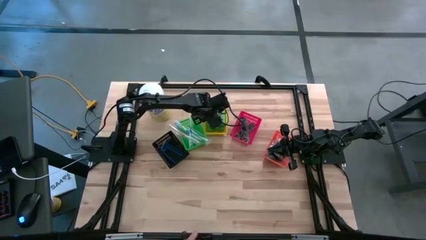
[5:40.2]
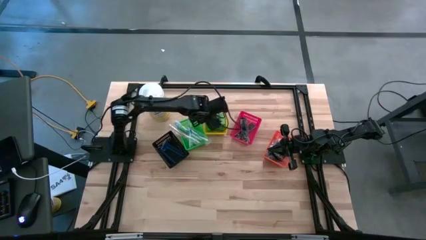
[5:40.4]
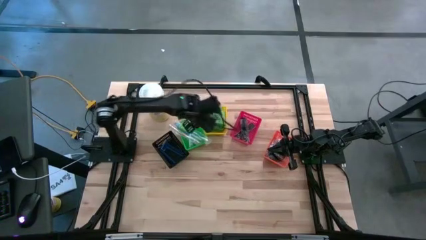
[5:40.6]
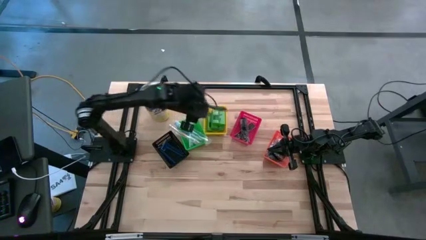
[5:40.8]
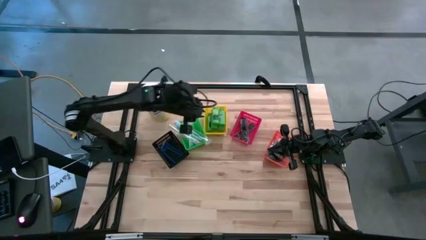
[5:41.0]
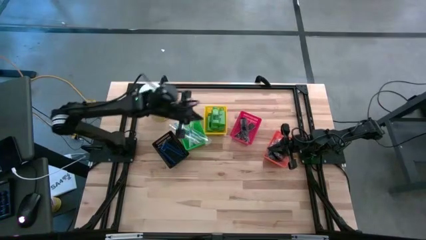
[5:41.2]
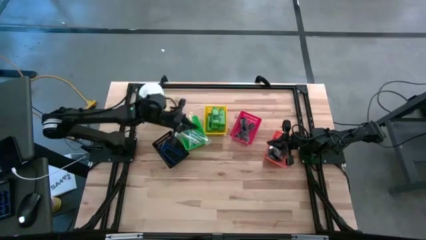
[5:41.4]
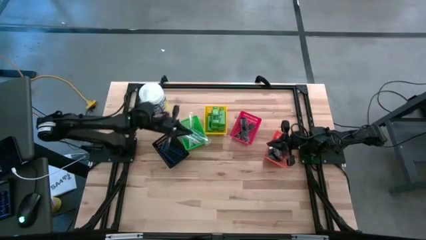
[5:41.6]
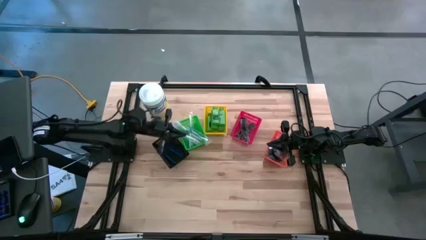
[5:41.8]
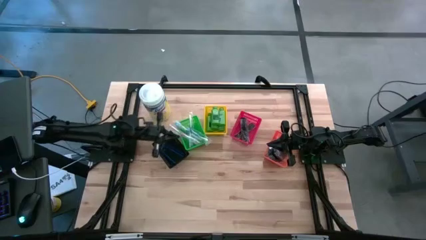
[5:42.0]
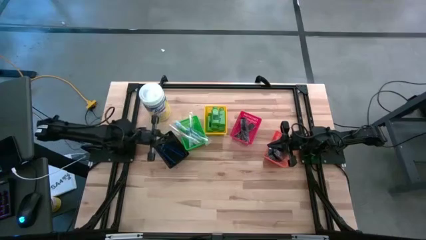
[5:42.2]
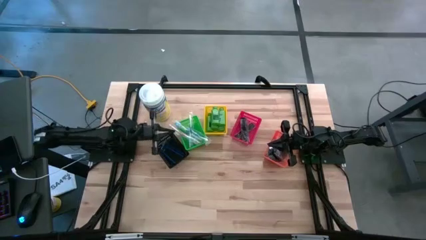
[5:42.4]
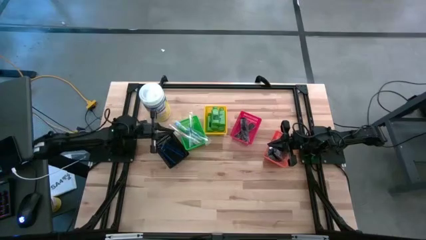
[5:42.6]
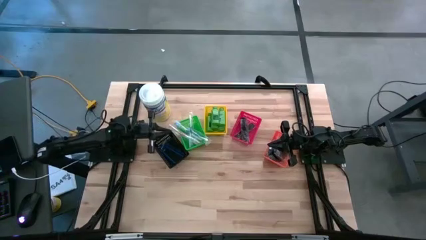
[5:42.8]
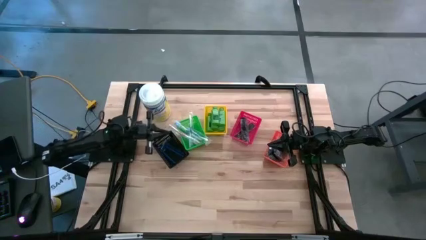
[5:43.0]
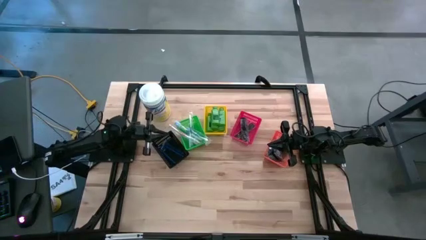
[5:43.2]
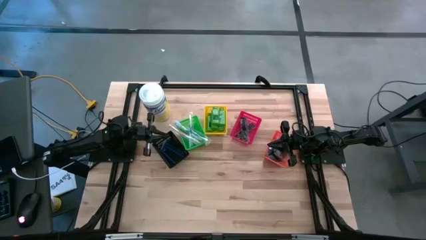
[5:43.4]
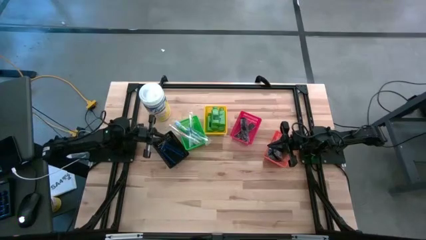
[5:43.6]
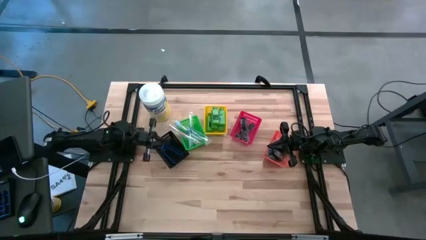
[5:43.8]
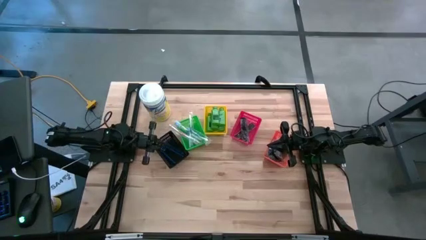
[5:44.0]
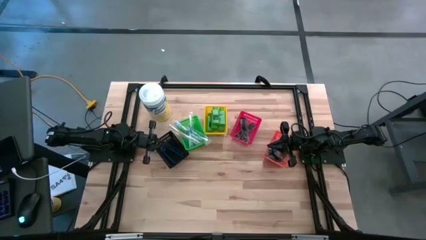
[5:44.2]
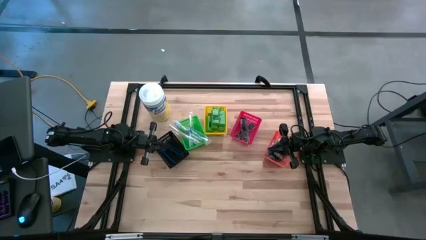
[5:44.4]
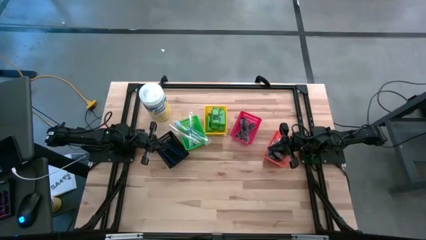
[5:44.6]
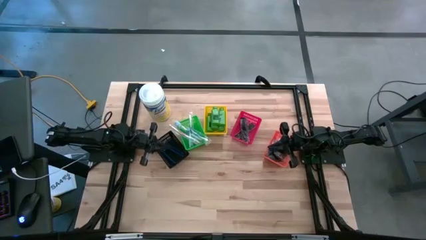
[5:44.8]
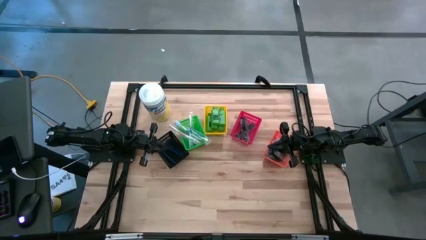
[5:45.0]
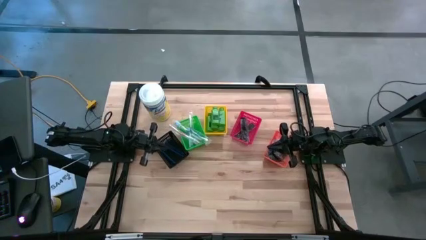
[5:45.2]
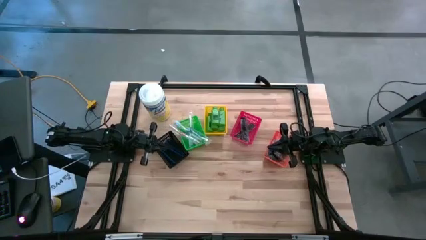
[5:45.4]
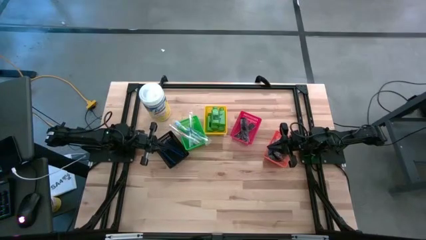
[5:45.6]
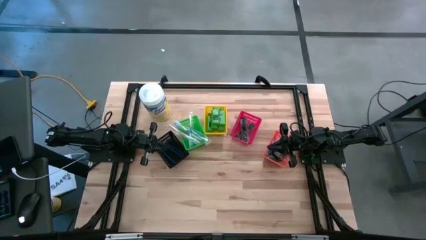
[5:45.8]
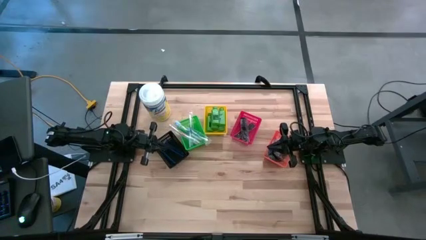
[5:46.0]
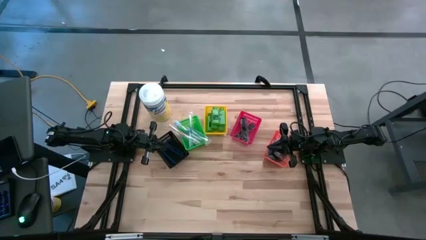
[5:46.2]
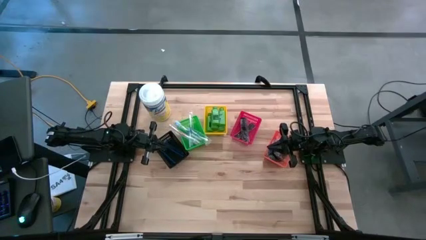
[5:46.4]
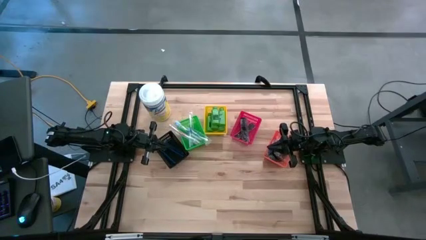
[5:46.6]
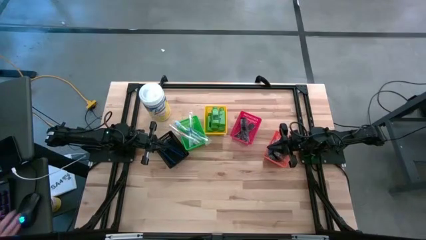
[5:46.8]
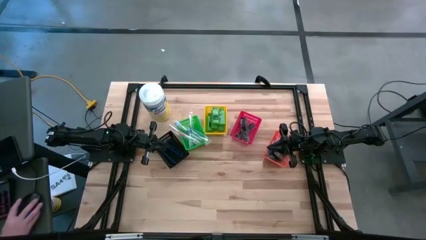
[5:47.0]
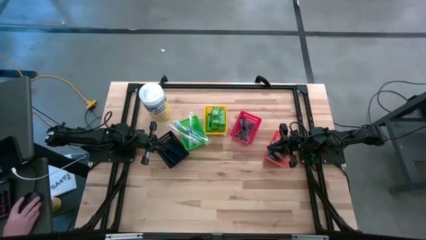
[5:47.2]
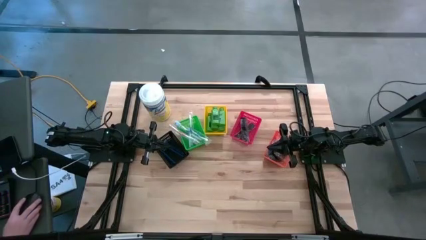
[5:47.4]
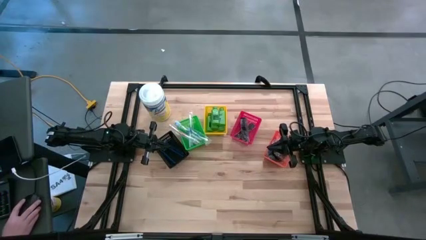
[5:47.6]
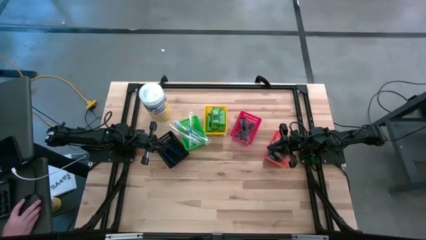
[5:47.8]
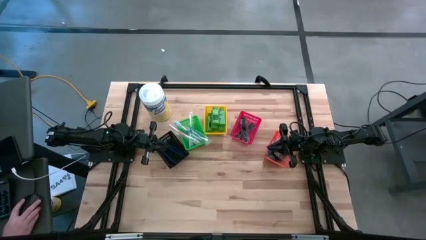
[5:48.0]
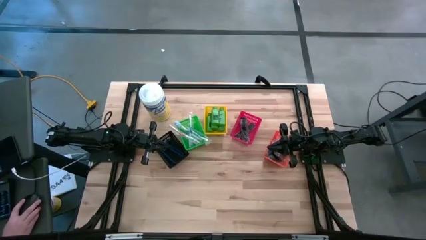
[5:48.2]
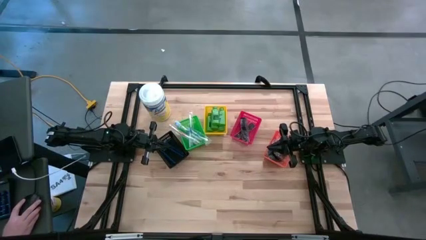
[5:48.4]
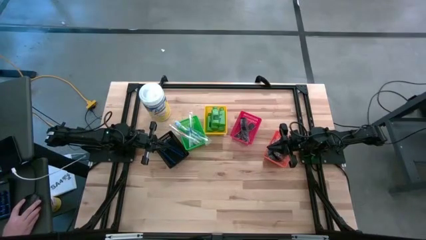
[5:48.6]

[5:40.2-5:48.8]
Task: Pick & Place Travel size toiletries
Return to Home Position

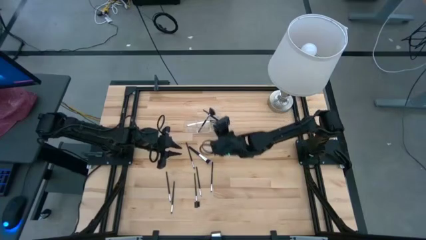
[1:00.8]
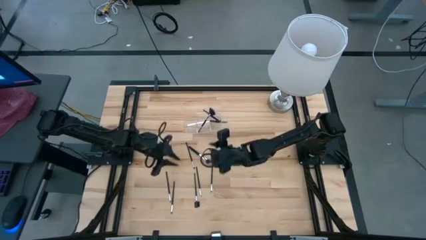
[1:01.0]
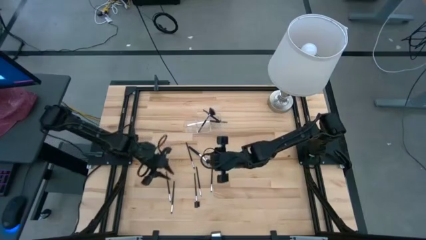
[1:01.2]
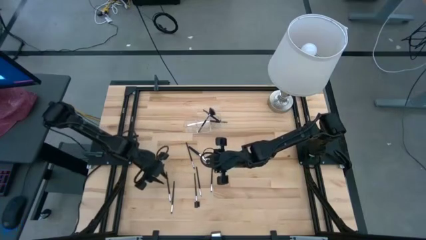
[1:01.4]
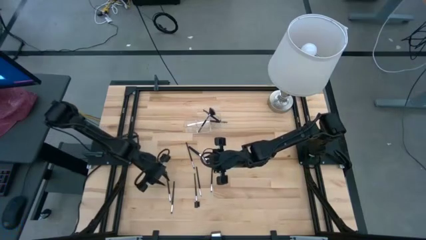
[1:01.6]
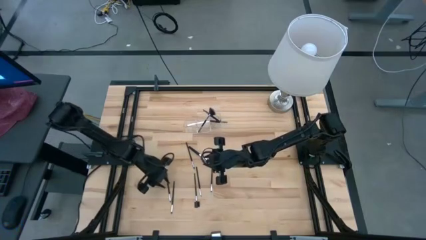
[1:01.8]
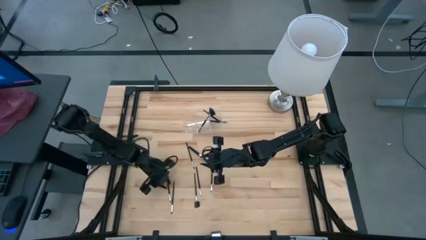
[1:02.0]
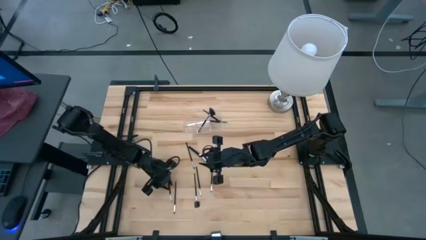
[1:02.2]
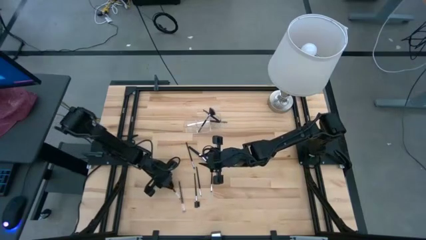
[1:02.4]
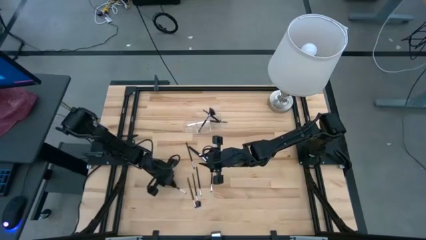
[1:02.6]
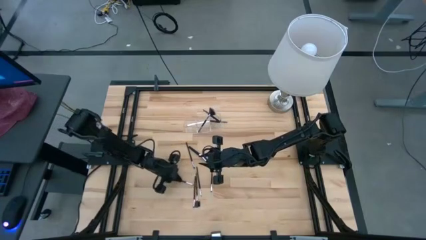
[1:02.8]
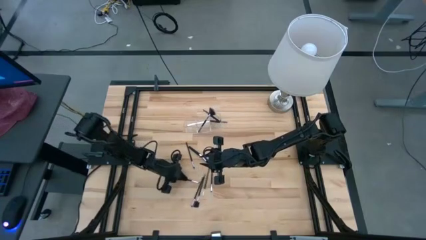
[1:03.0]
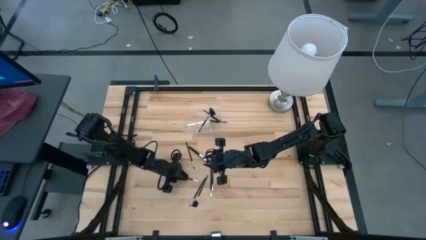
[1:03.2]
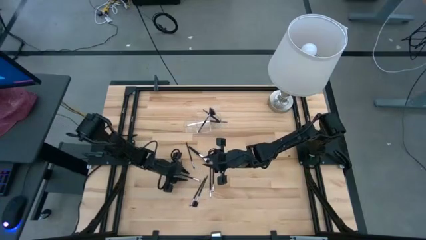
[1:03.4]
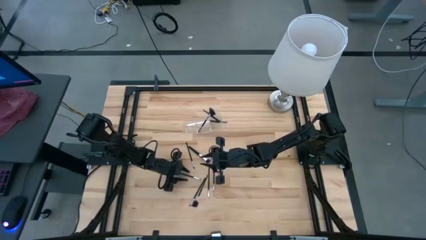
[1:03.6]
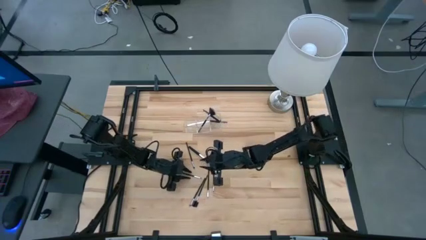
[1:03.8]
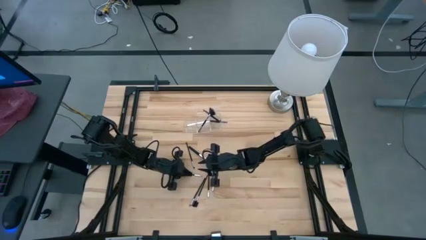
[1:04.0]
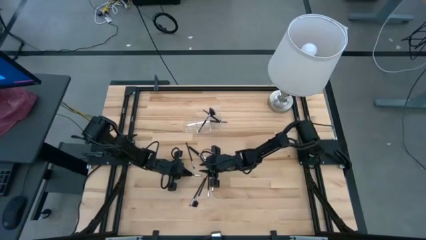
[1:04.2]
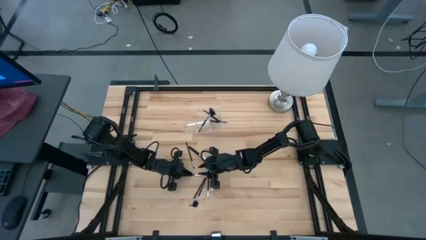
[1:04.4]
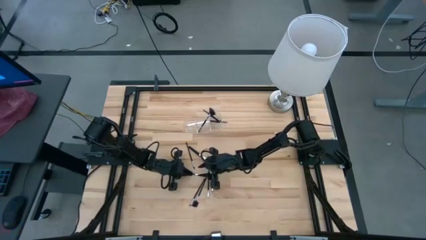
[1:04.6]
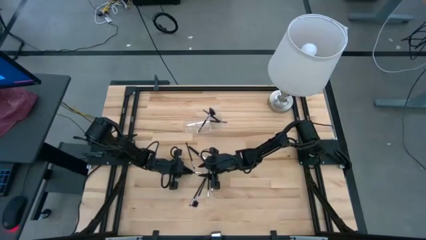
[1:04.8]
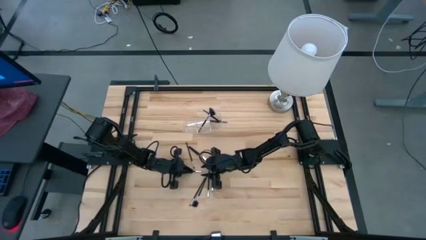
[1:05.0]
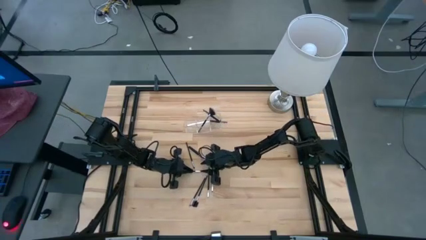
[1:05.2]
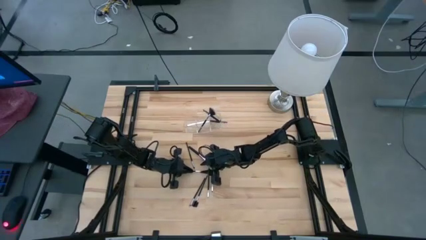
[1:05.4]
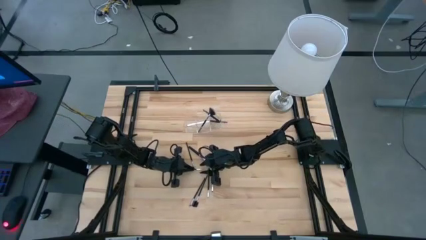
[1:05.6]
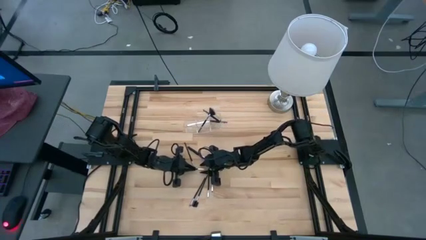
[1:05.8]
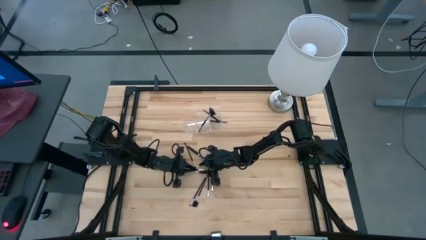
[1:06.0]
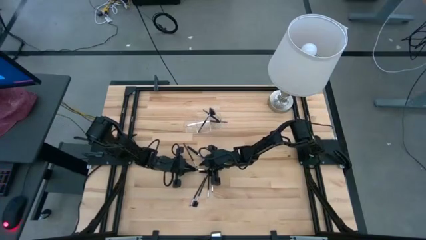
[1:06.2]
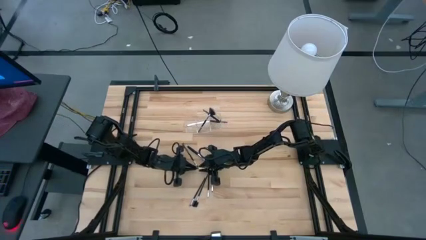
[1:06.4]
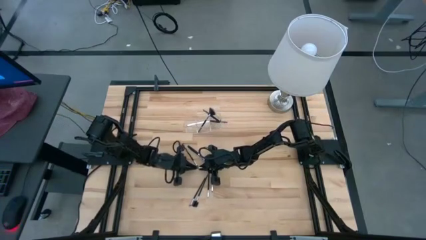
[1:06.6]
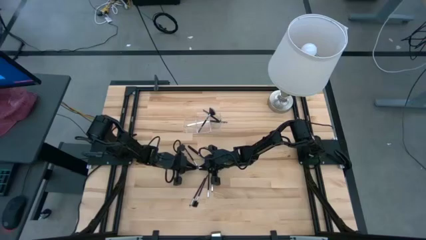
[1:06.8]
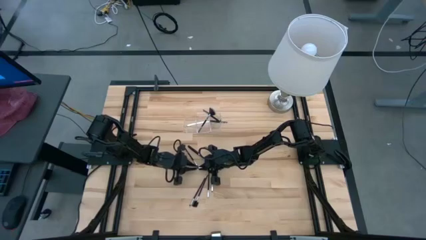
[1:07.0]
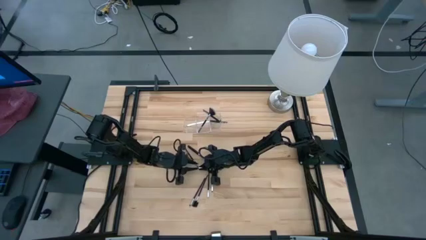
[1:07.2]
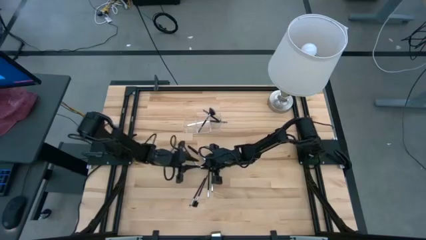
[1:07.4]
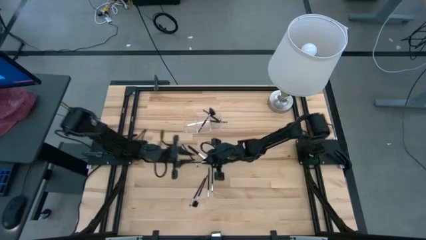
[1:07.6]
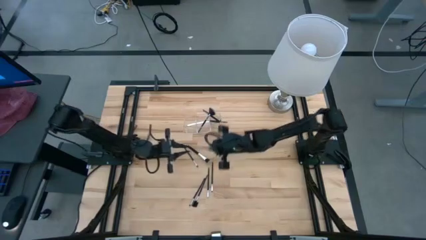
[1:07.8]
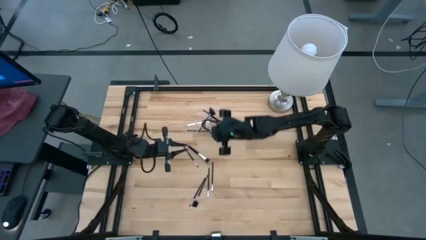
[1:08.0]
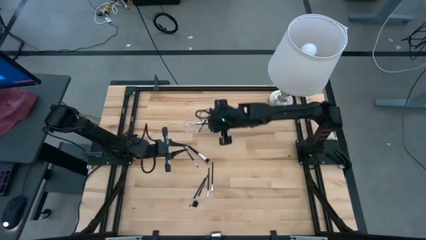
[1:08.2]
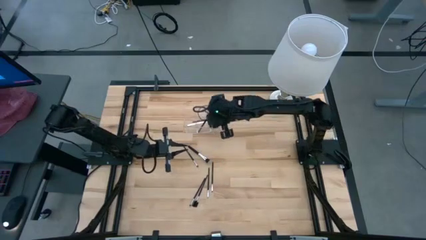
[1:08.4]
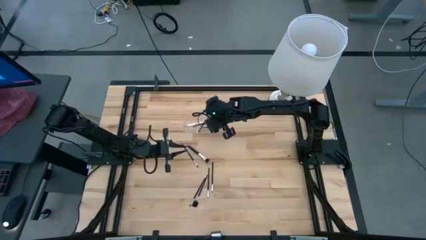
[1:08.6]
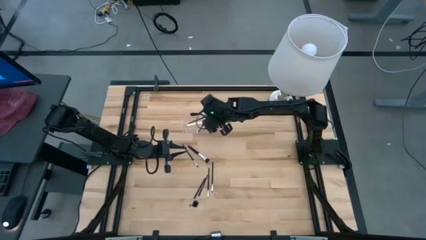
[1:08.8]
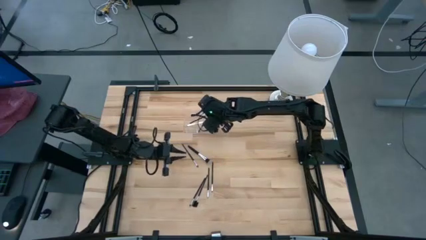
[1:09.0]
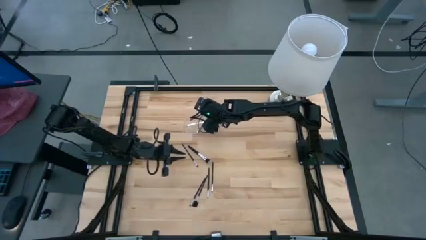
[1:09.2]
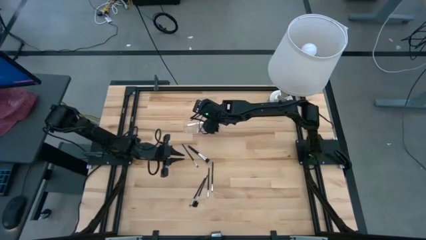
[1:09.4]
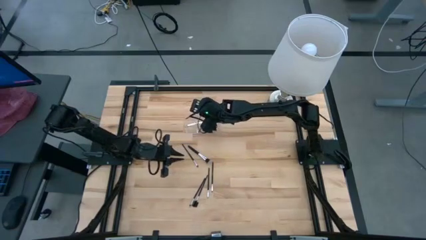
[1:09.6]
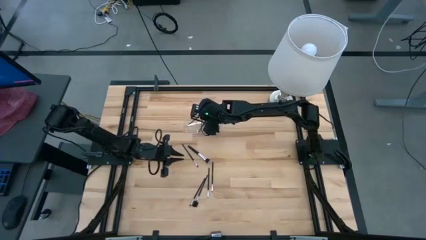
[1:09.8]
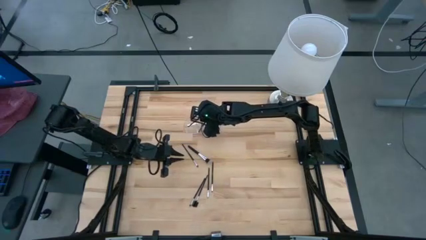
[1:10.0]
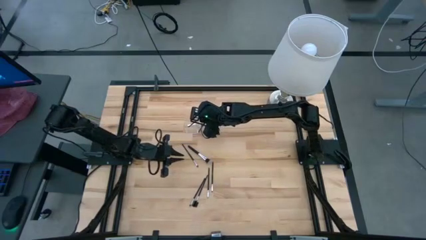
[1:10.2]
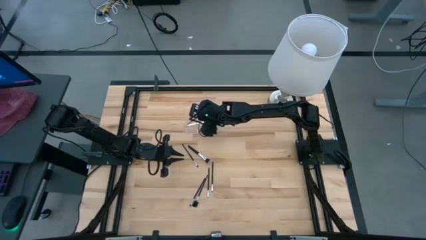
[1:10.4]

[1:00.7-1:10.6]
Task: Put items in baskets/containers
Put the black eyeshadow brush into the transparent organizer
